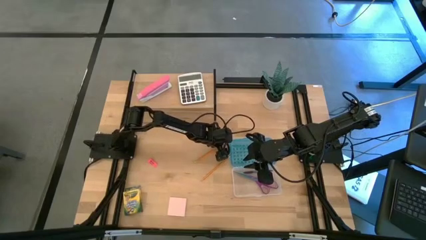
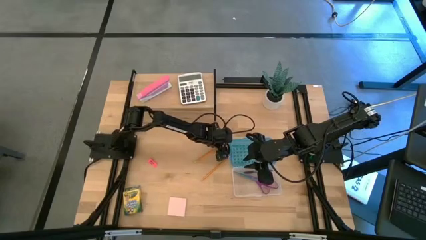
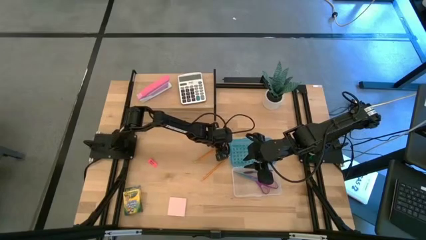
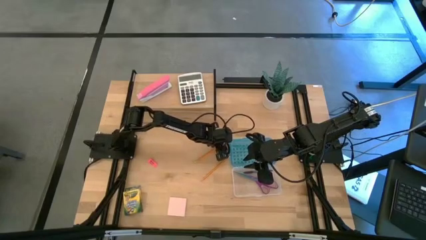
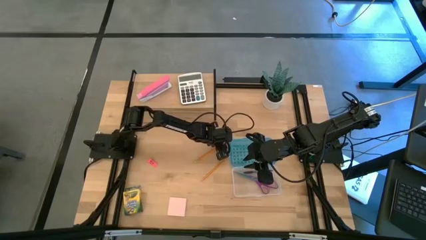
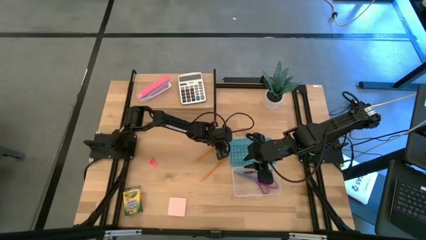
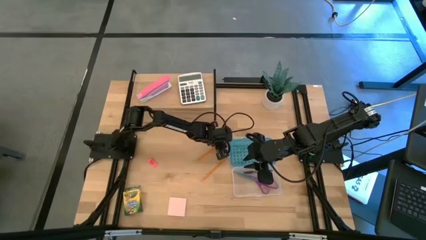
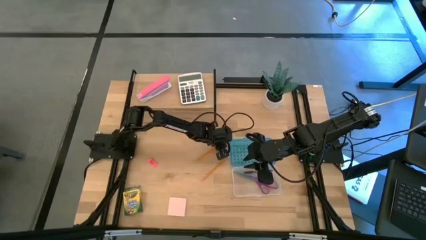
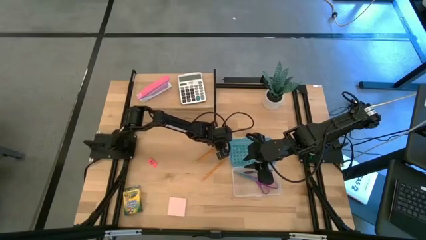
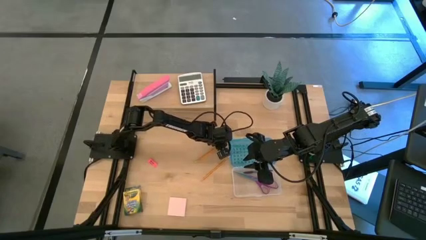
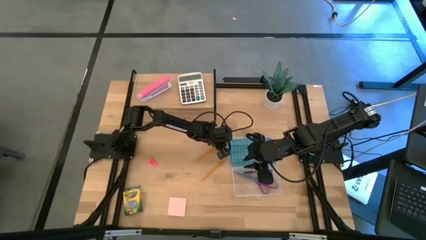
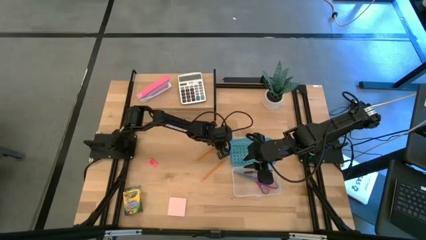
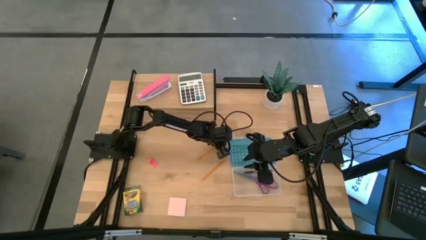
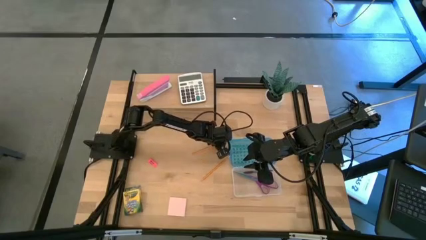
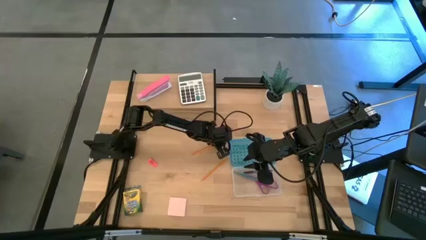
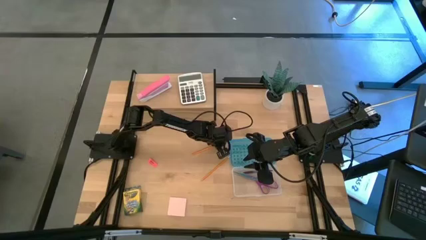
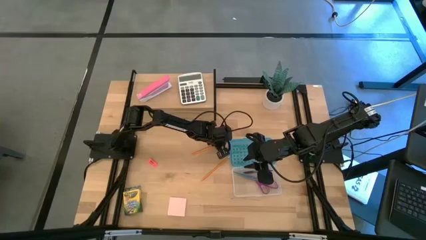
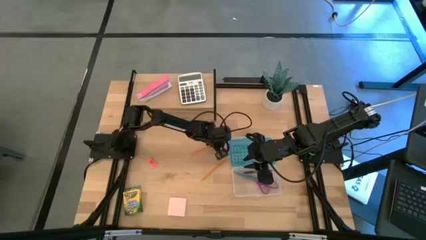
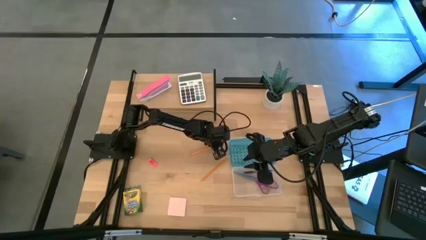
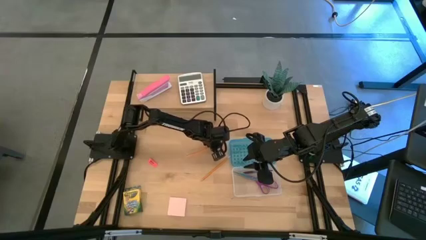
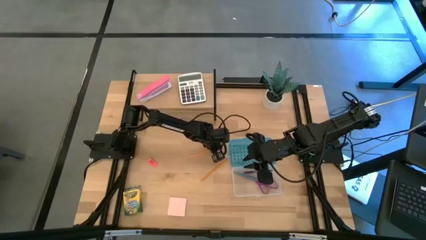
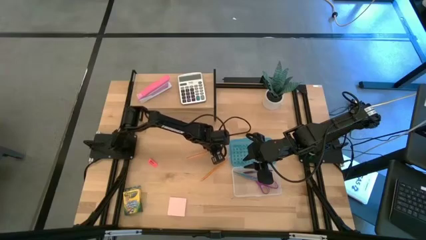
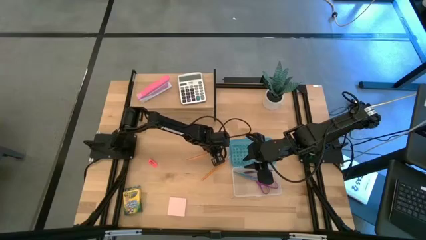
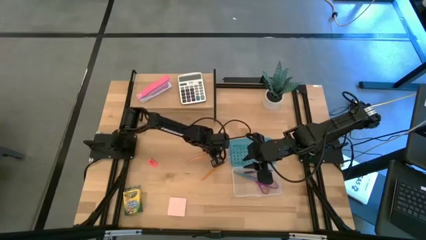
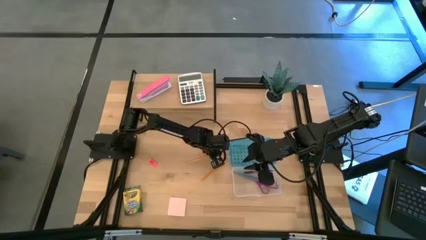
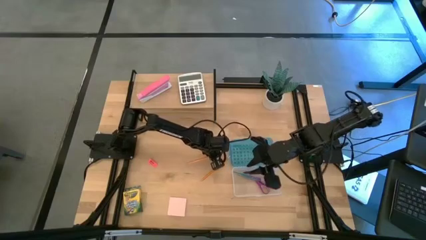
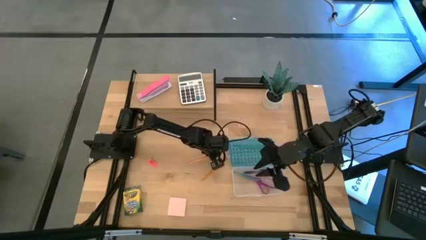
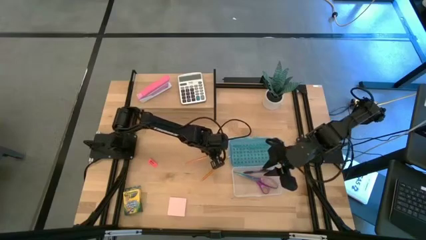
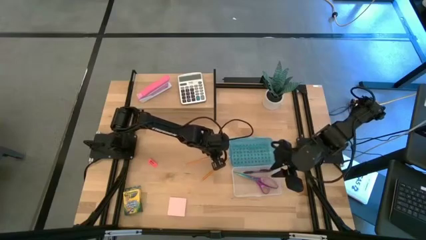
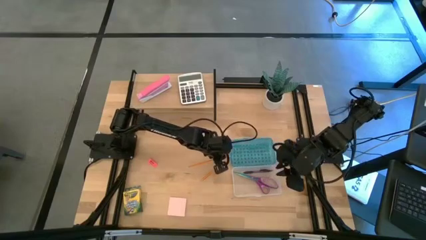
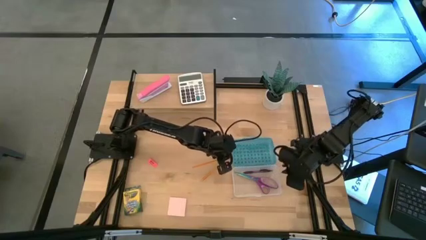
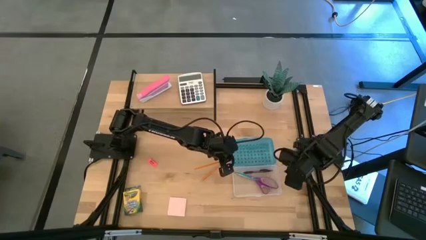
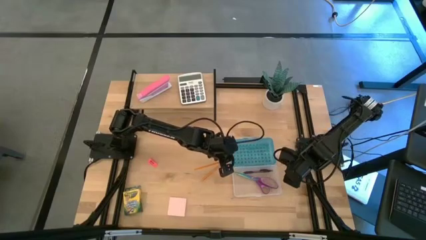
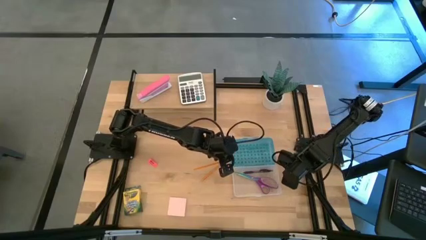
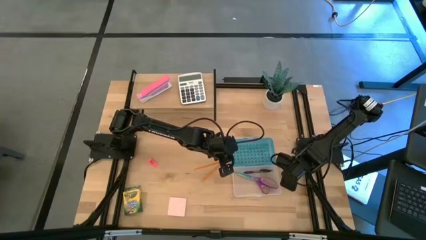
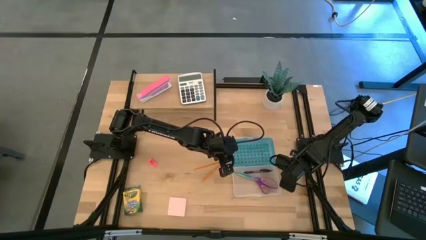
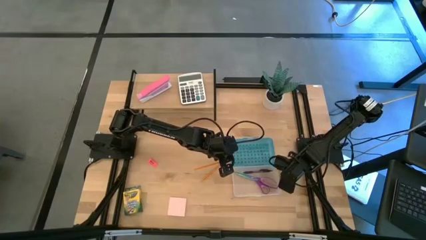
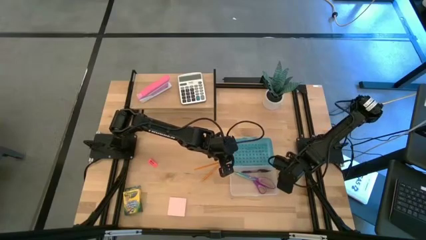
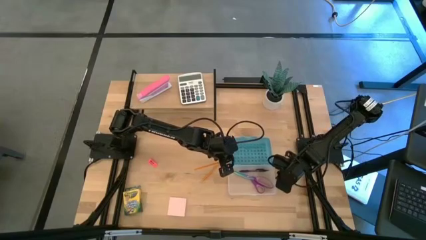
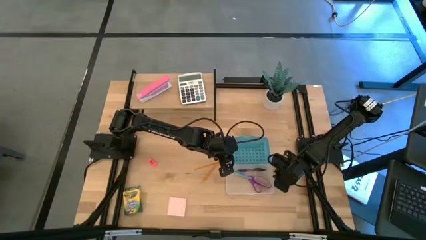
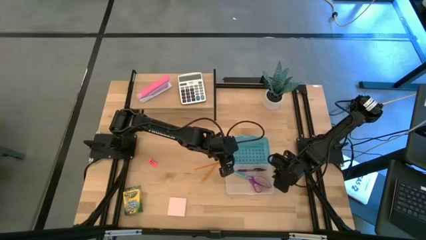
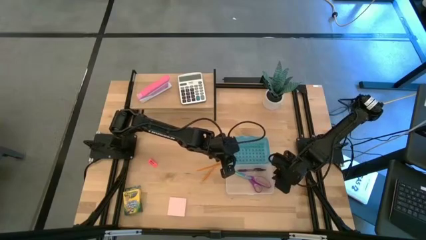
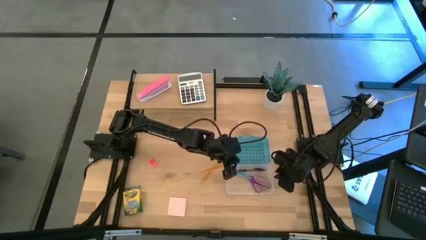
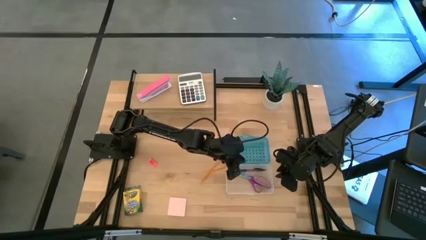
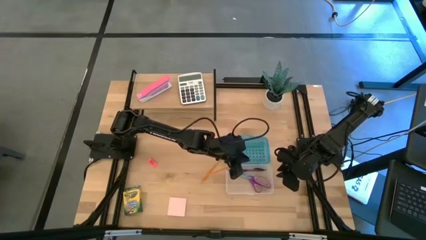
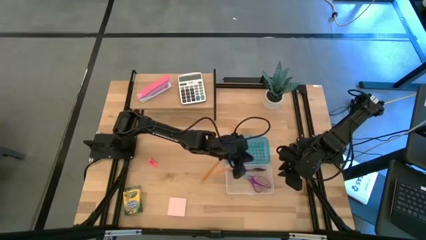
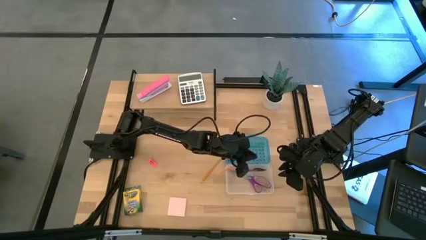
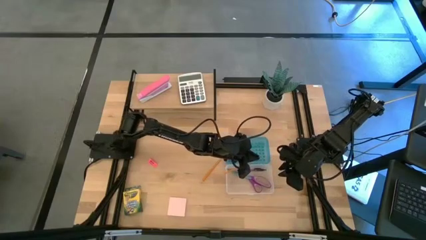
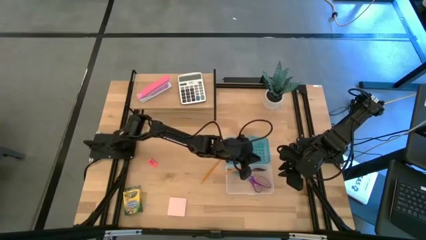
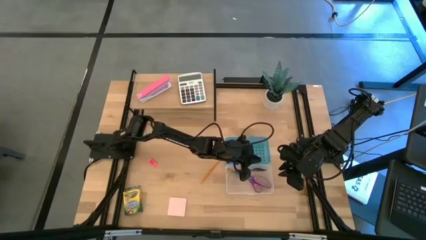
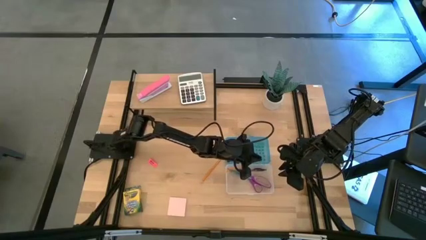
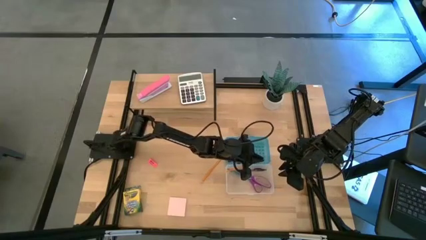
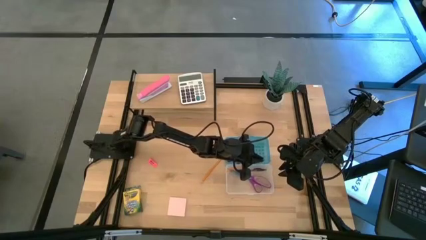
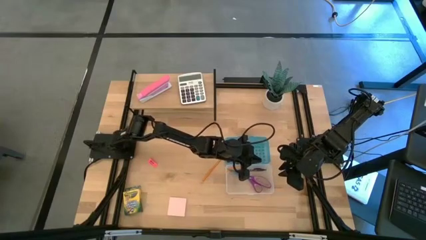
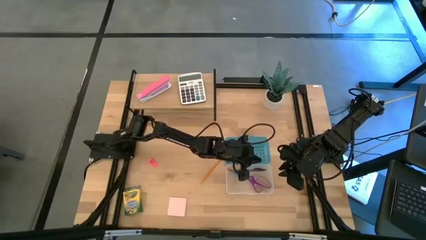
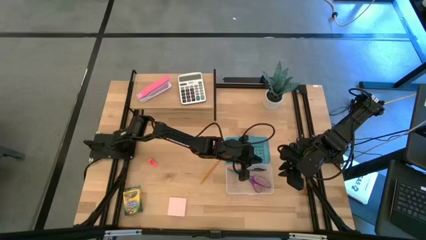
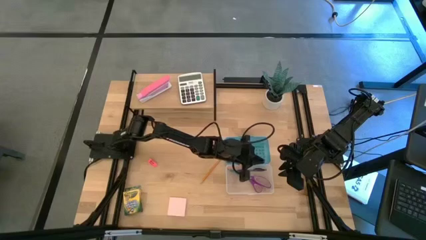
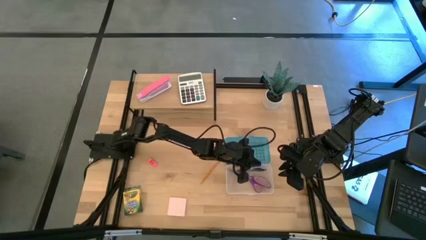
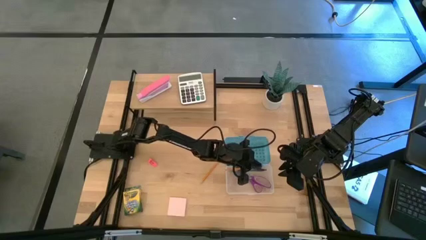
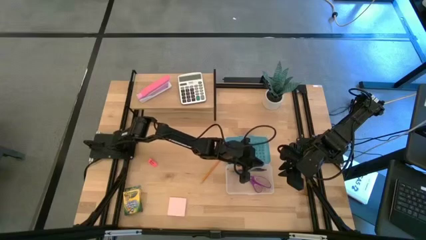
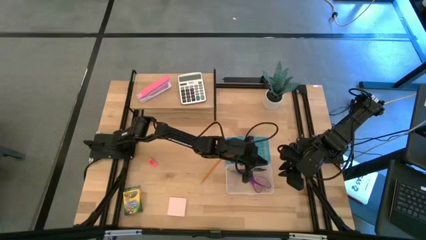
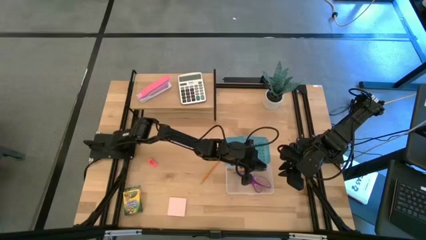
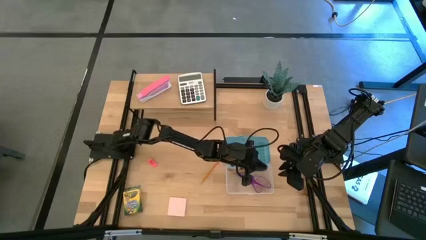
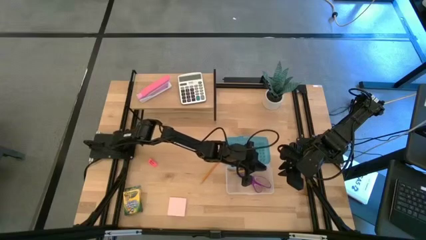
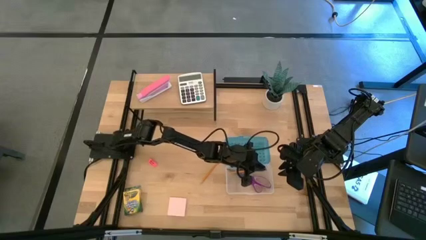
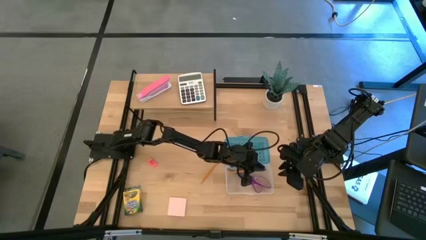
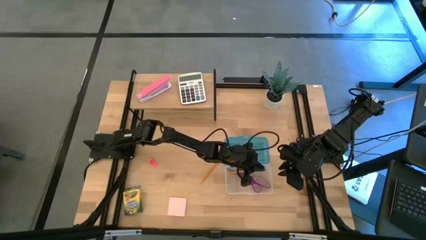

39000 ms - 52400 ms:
Task: Pack school essentials
Put the top orange pencil into the blue supply box
